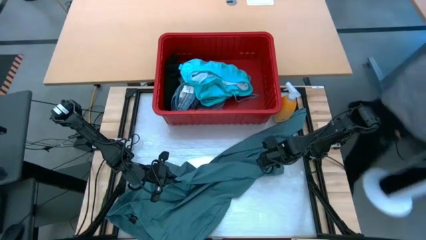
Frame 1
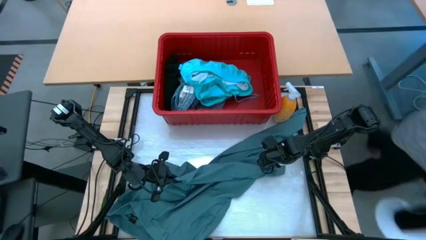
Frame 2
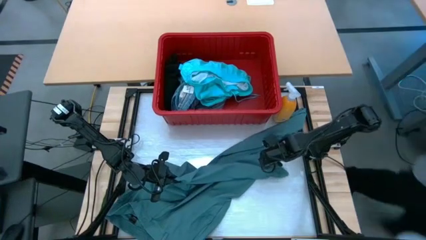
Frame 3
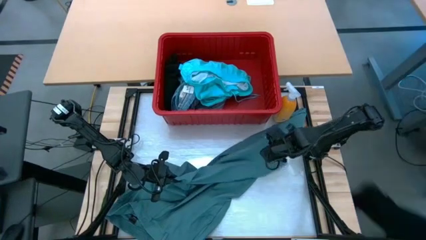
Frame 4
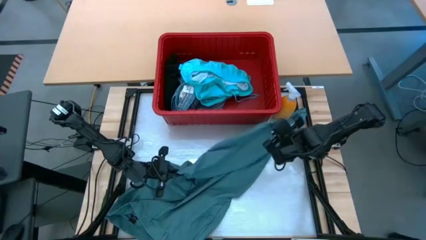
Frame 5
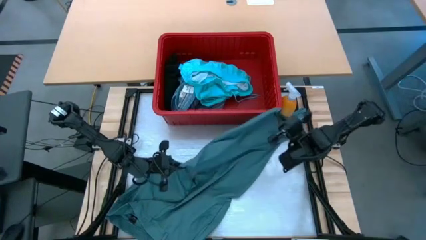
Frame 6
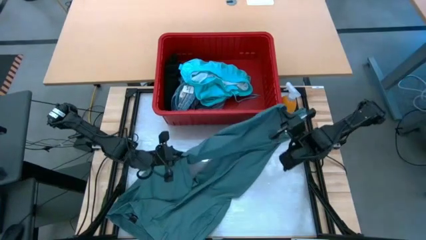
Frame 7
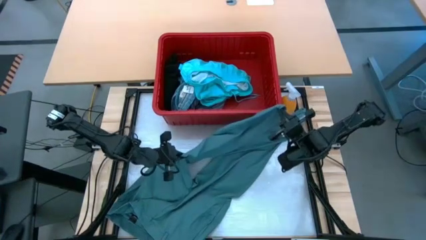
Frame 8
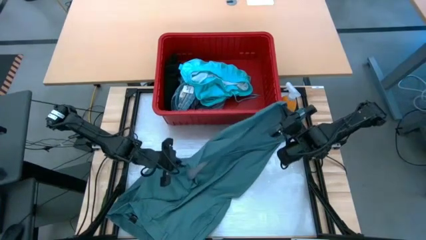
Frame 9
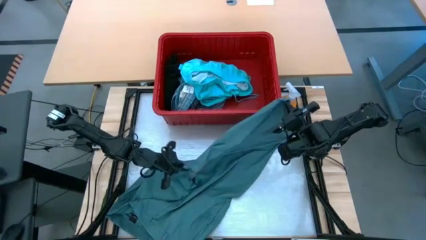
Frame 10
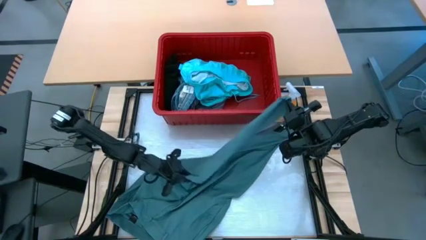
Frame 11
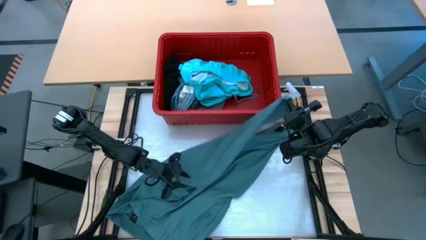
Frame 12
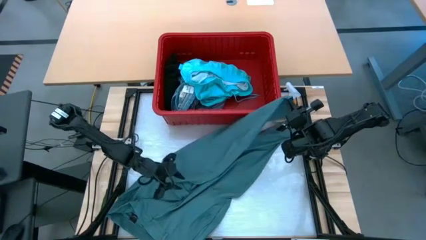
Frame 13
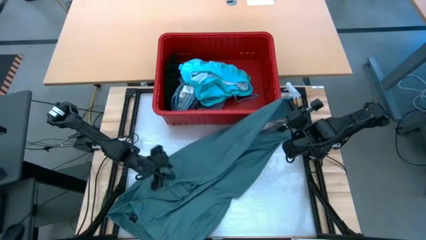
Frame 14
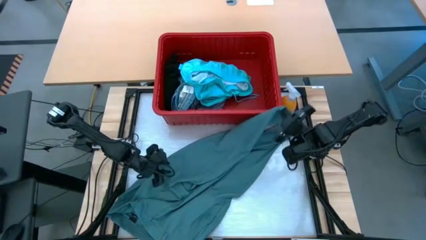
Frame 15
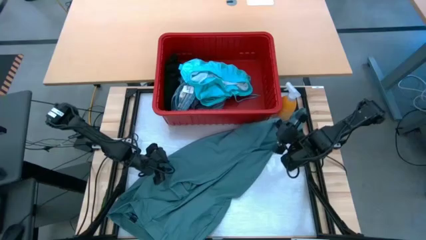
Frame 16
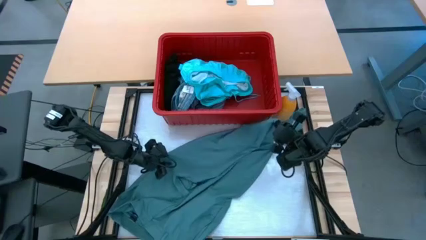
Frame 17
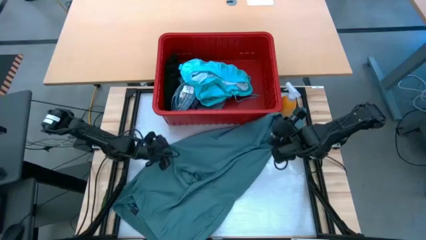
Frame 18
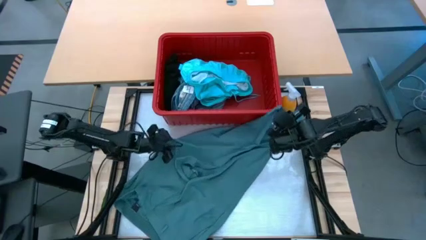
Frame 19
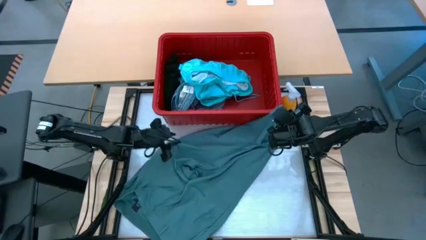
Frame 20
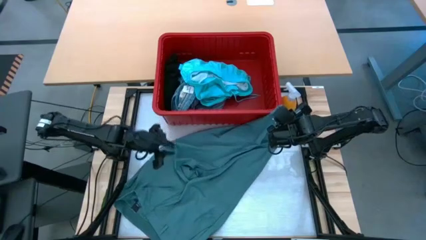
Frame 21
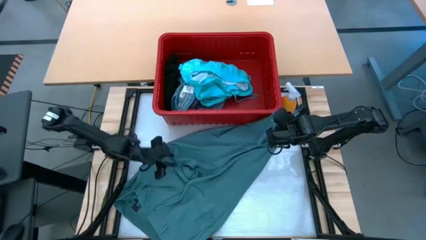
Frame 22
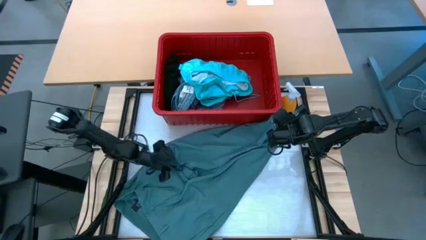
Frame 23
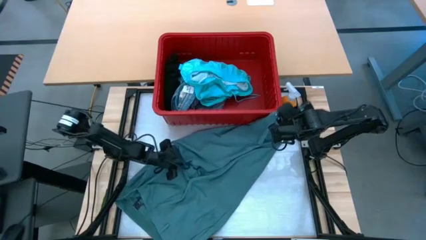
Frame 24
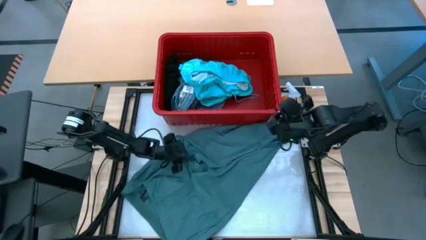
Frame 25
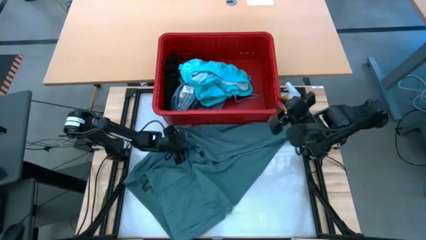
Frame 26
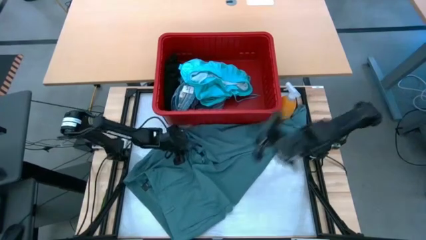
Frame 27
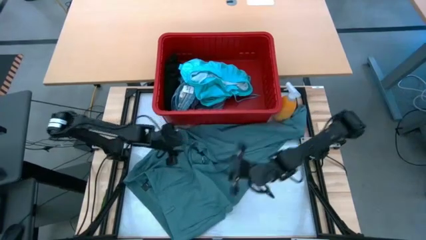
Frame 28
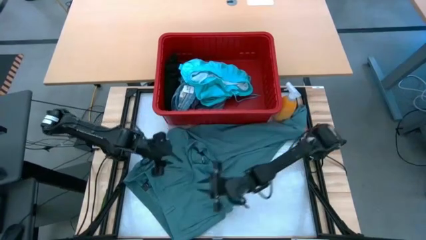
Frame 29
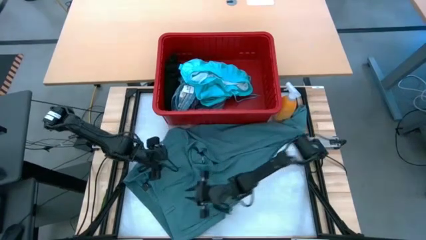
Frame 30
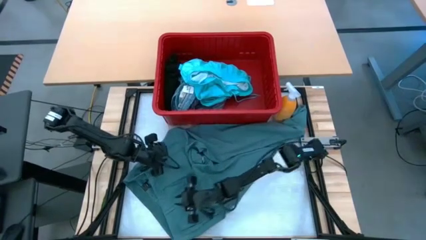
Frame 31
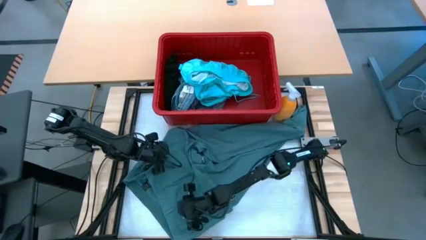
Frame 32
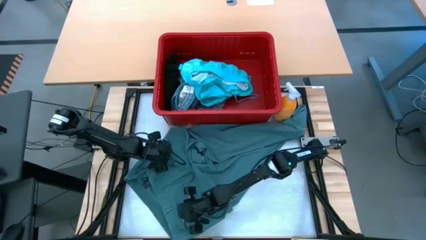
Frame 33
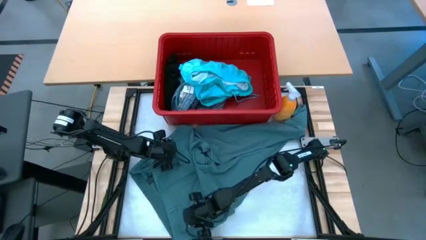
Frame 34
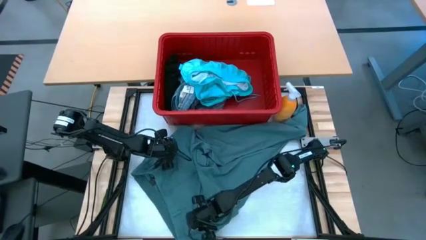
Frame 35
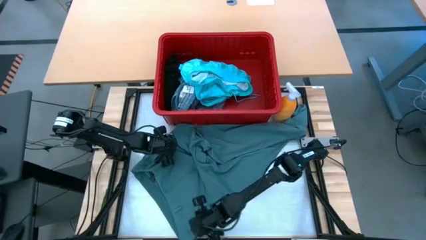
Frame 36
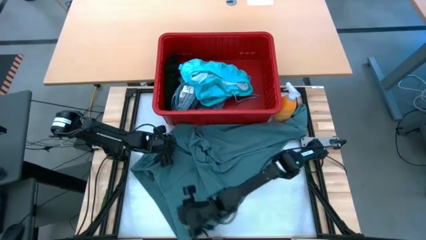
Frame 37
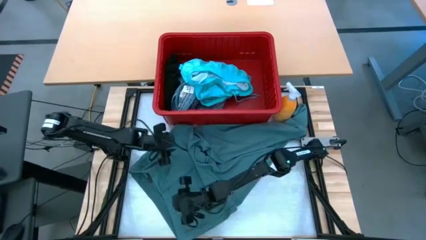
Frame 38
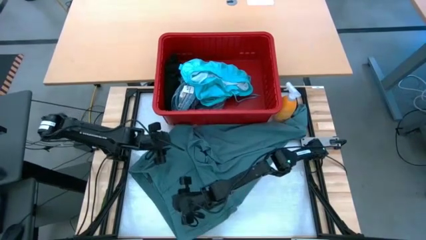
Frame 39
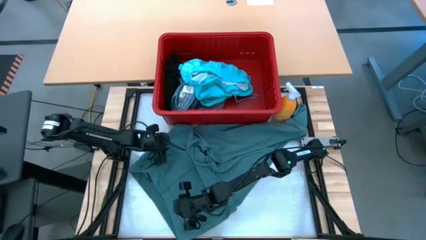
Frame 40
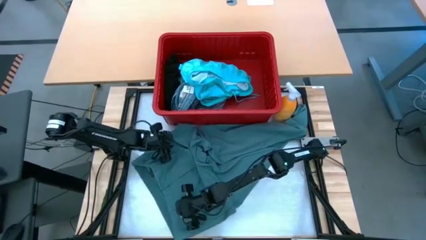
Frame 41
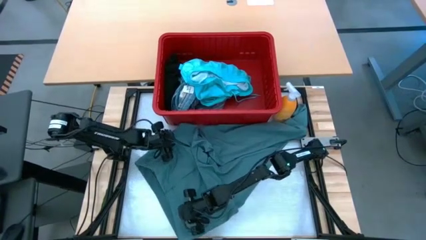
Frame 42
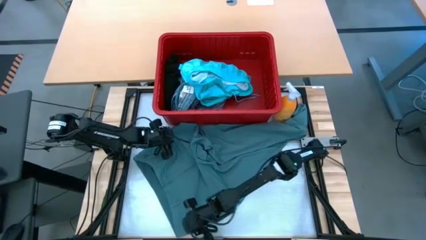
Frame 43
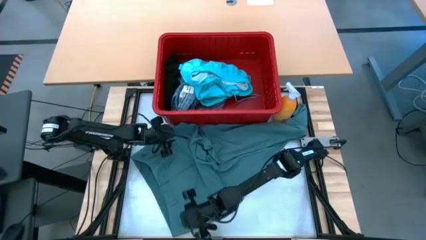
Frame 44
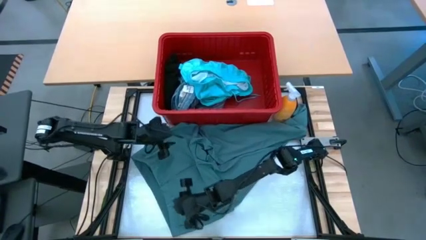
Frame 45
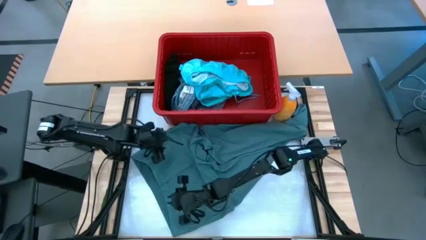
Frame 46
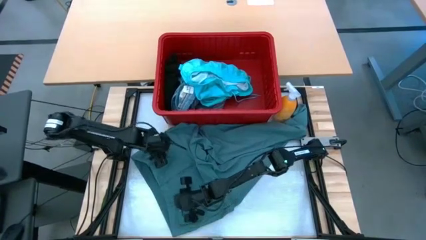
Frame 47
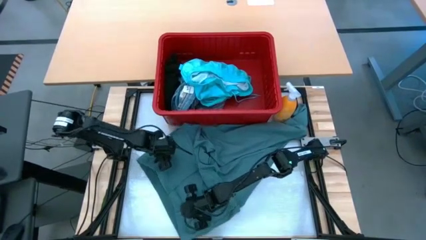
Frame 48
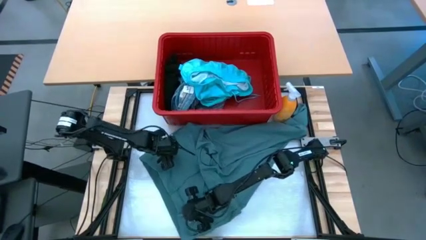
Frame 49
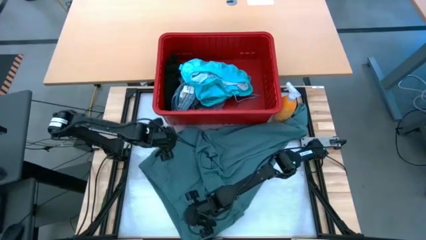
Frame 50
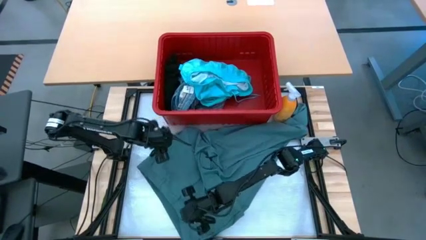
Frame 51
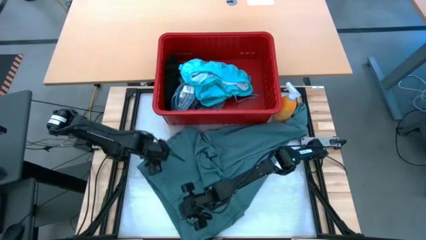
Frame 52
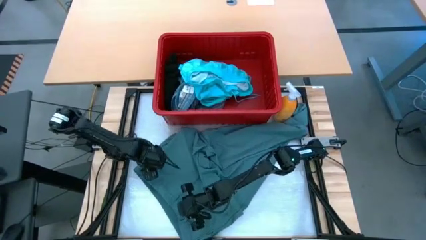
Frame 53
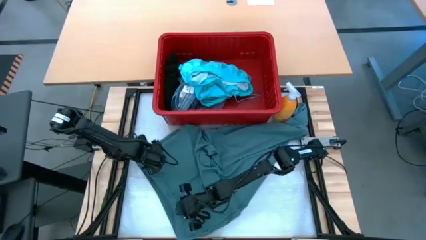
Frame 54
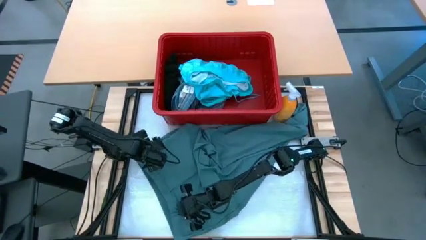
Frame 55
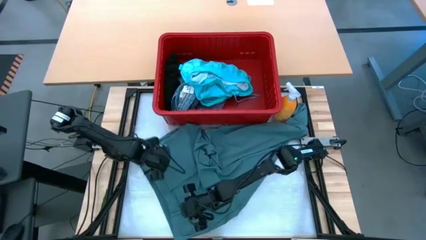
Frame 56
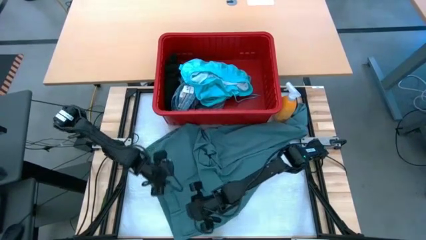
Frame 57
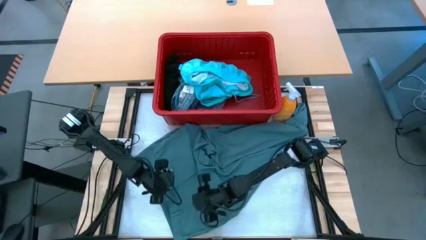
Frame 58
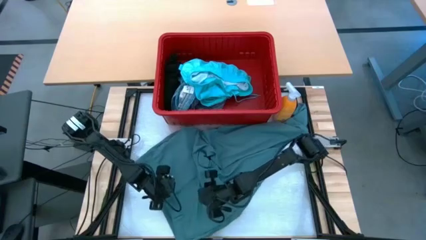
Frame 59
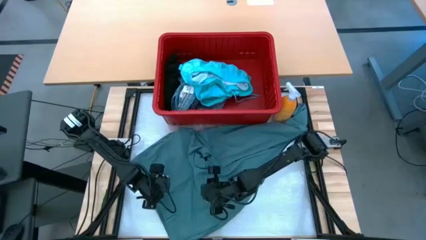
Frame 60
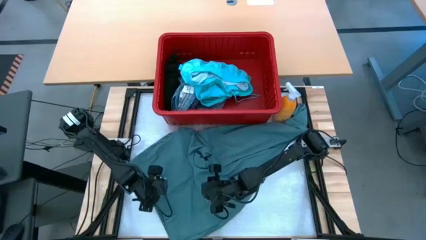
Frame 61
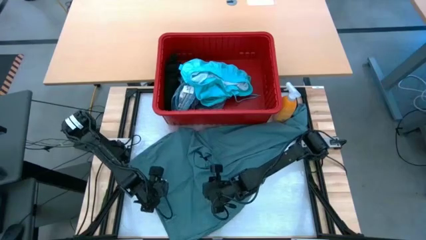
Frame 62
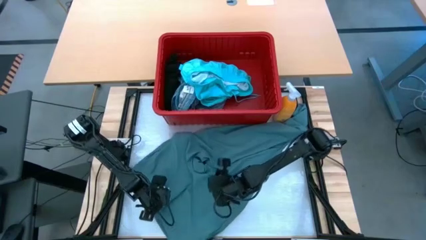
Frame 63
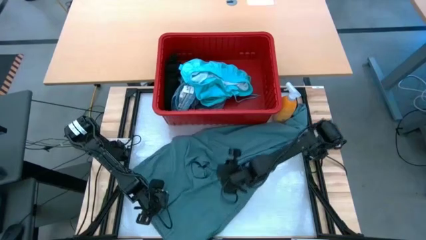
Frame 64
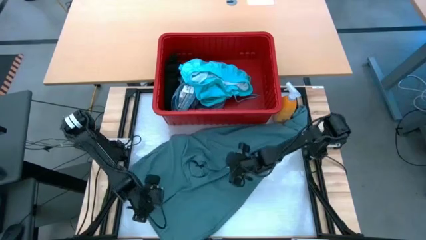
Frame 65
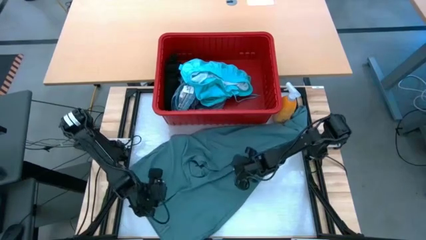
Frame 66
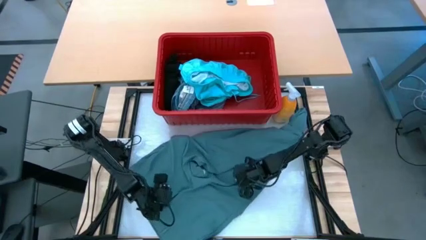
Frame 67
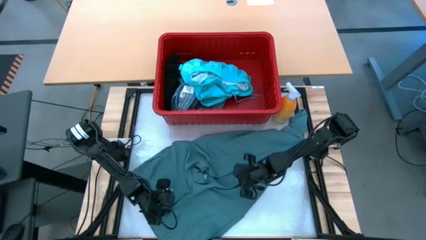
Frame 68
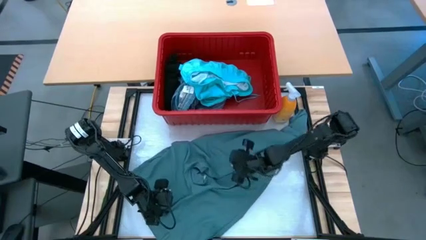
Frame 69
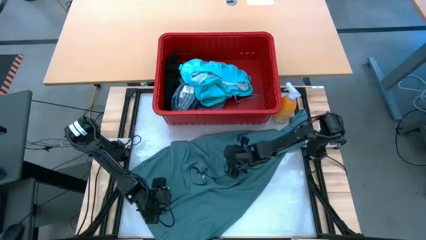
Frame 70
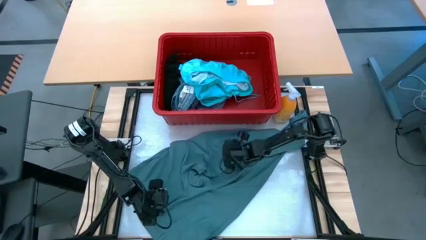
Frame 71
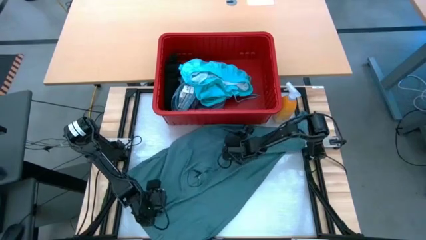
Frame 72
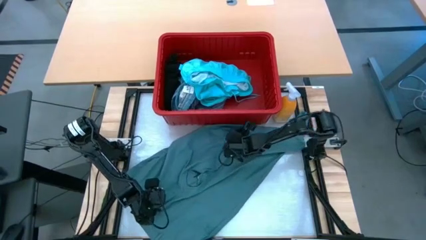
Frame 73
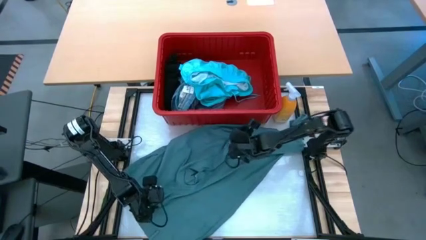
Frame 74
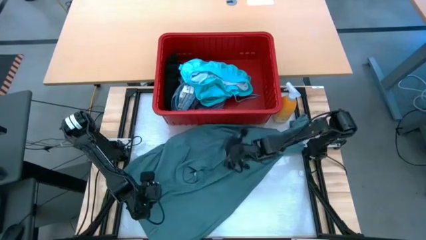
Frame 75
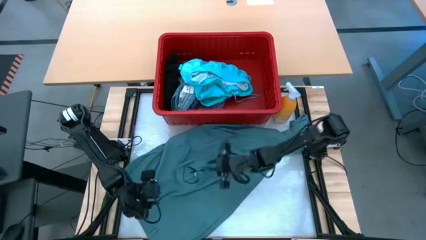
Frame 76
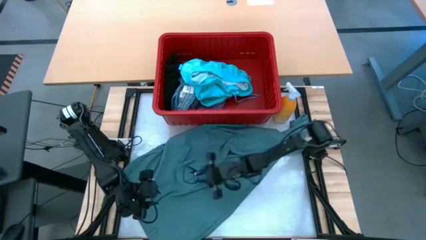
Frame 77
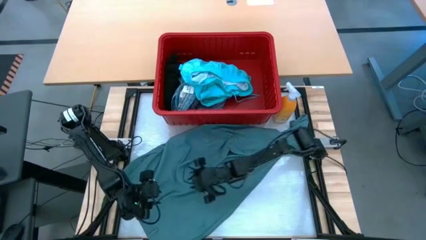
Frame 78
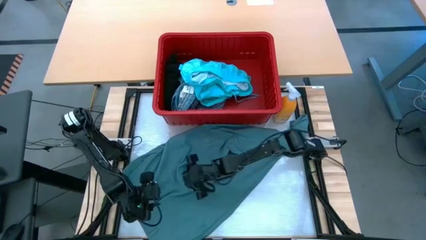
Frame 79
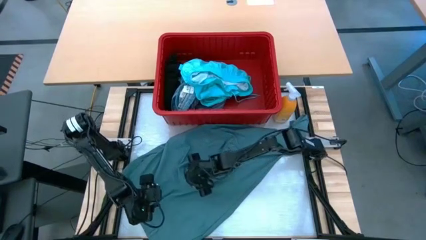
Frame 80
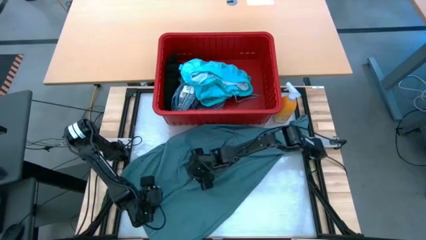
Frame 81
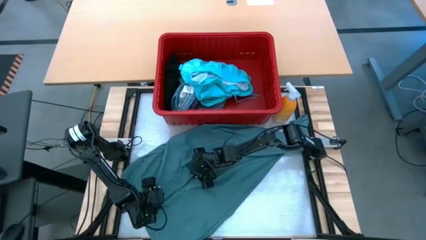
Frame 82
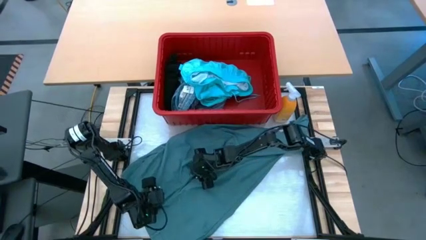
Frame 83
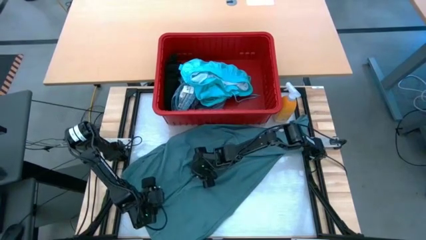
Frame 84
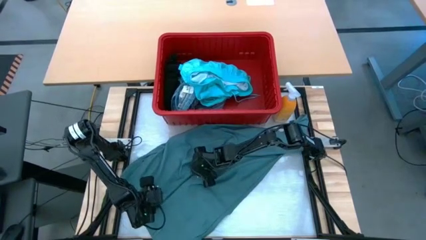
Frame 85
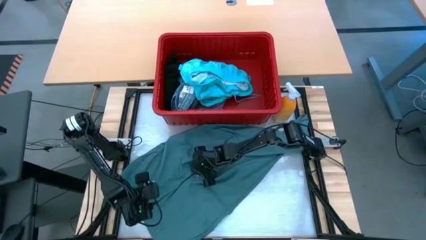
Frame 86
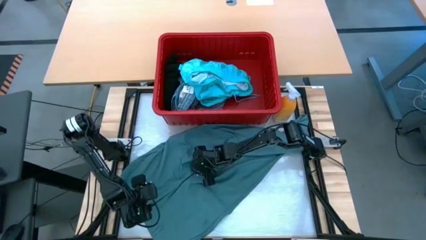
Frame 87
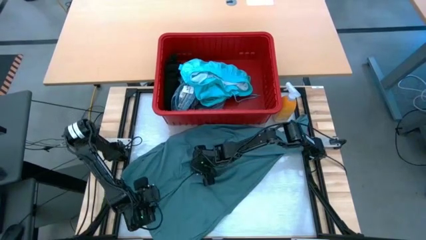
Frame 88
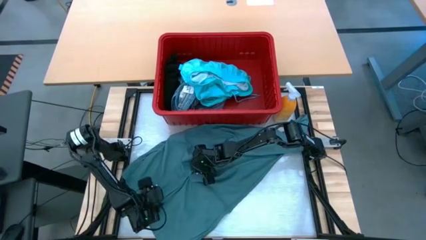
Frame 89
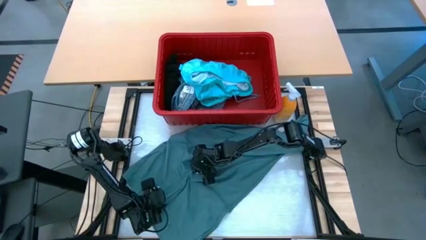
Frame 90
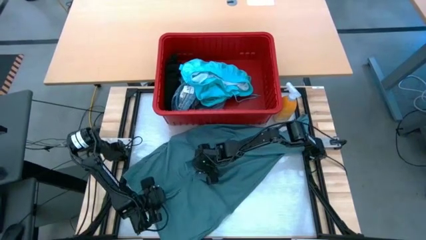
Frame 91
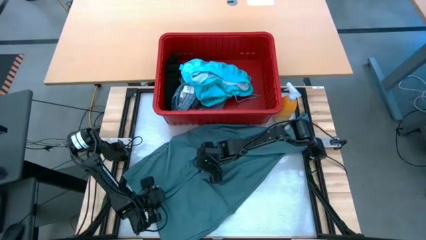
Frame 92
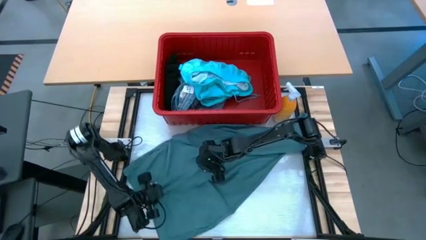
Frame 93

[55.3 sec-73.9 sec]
Task: Fold Laundry from Bin
Fold the light blue pants
